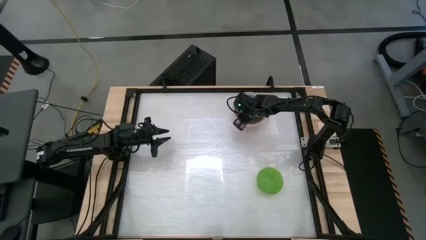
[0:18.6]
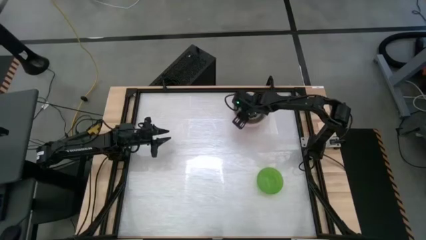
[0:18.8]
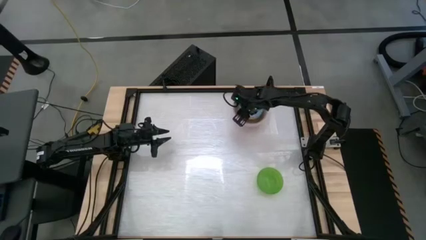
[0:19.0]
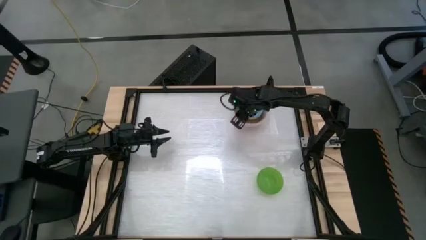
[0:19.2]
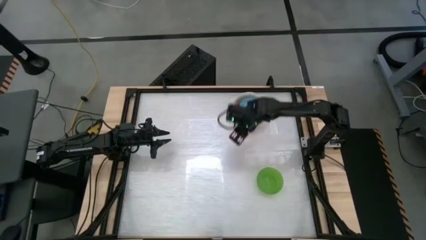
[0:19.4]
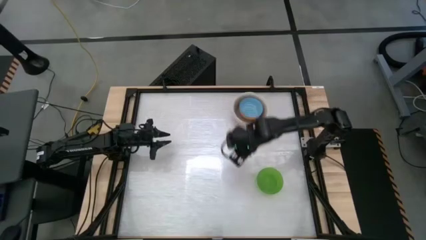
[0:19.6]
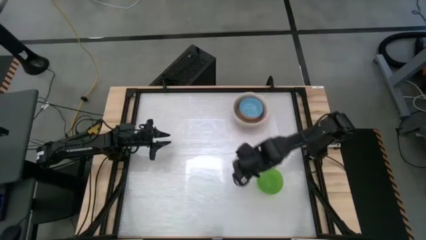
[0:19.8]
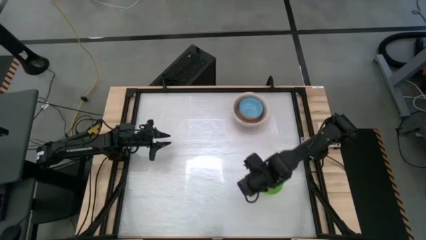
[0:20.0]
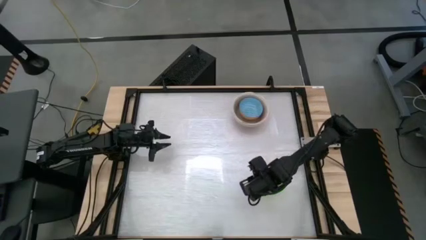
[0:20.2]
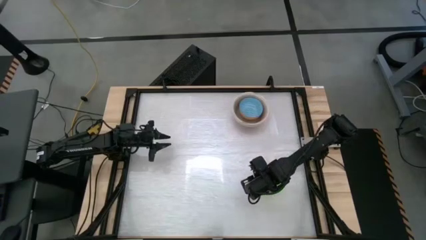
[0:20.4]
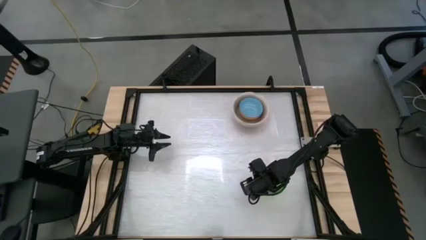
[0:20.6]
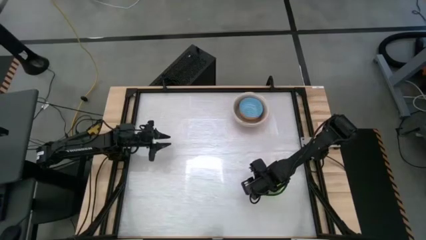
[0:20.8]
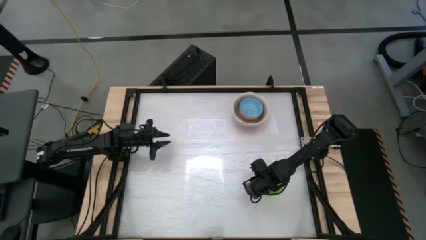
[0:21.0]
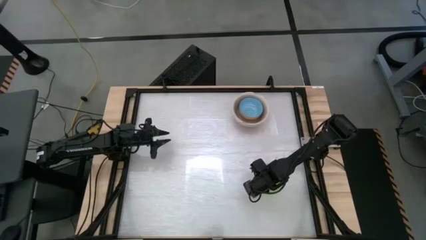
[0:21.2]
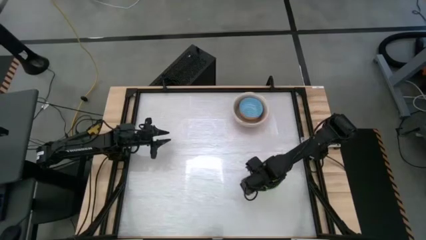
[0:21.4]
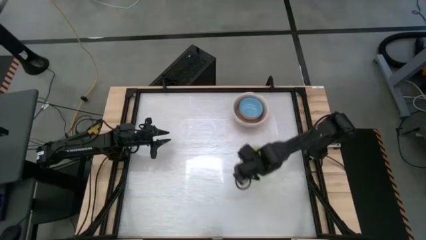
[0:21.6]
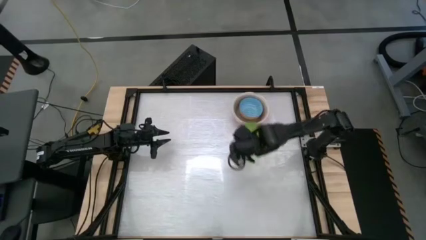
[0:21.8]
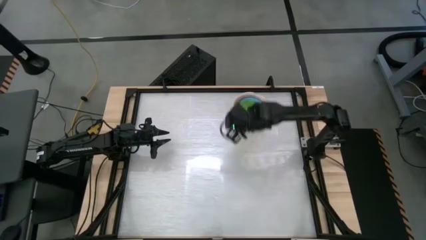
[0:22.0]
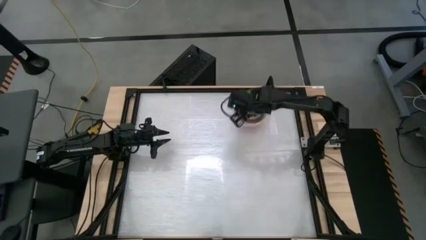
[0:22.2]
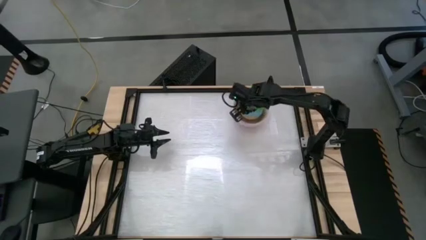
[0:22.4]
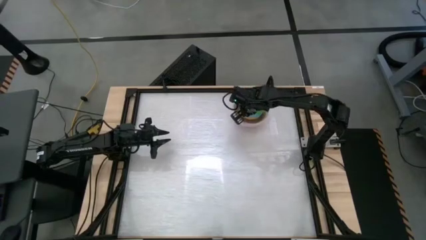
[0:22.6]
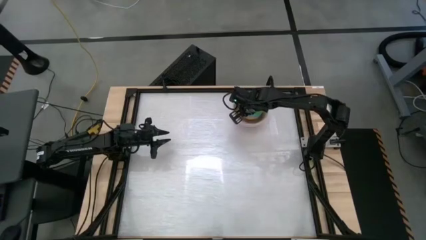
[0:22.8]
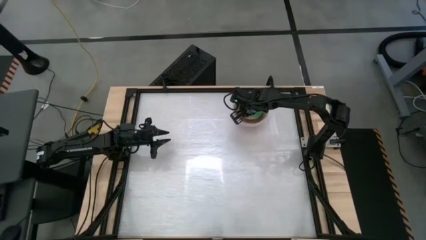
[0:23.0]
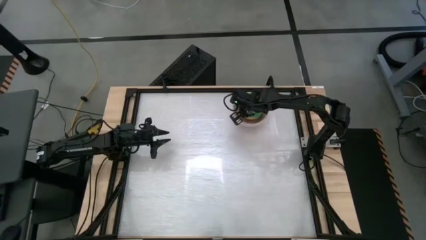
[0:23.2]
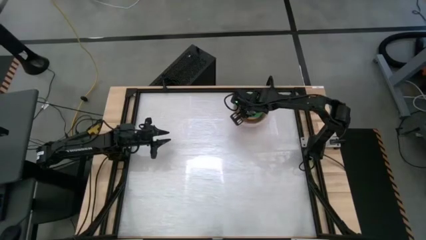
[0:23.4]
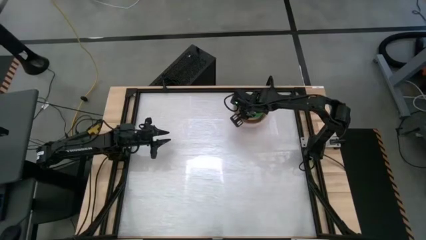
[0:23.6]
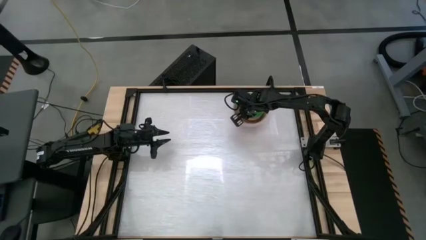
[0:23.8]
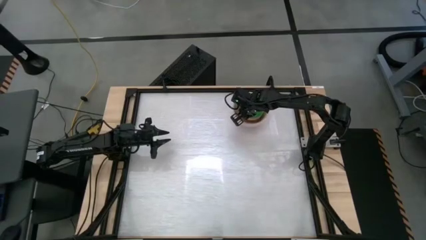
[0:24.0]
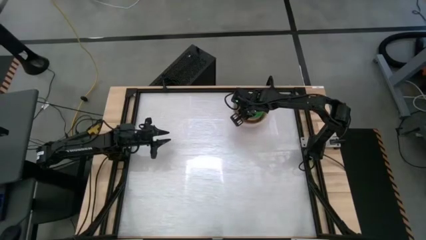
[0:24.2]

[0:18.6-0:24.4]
Stack the green bowl on the blue bowl

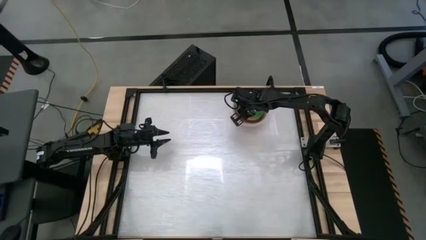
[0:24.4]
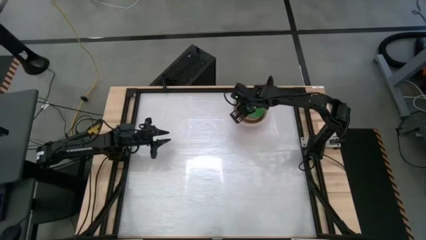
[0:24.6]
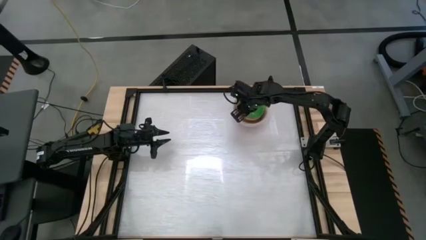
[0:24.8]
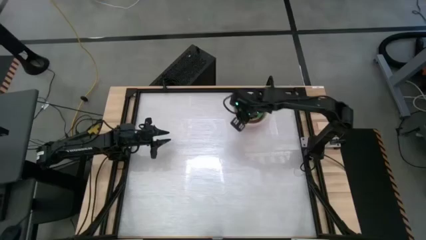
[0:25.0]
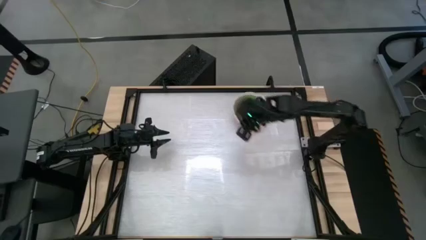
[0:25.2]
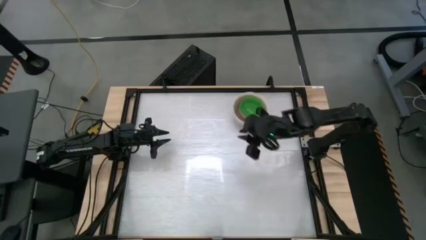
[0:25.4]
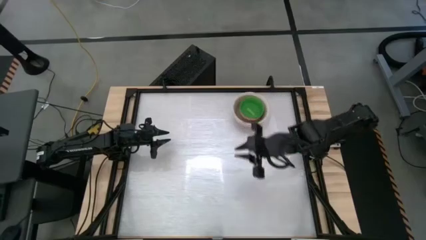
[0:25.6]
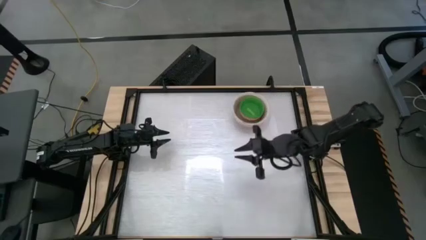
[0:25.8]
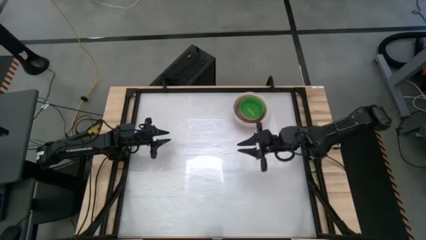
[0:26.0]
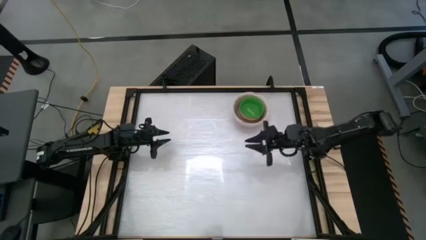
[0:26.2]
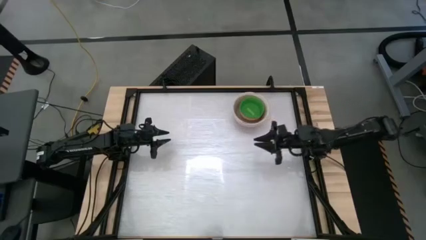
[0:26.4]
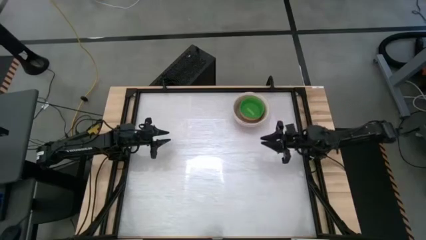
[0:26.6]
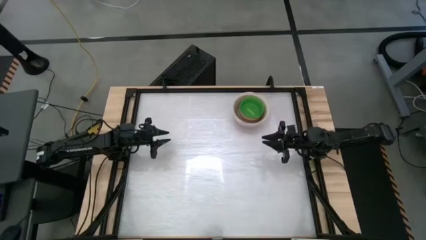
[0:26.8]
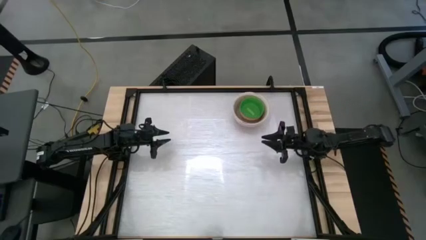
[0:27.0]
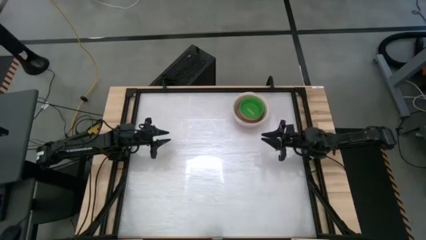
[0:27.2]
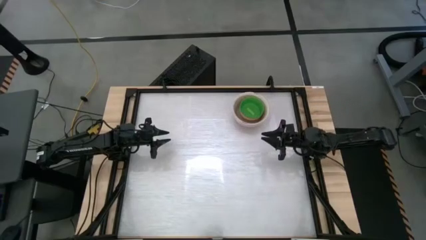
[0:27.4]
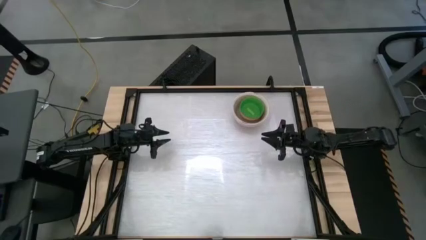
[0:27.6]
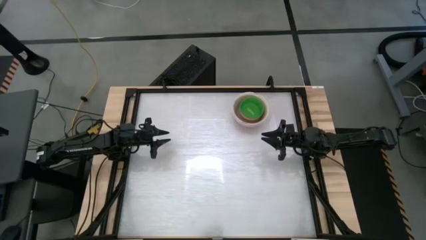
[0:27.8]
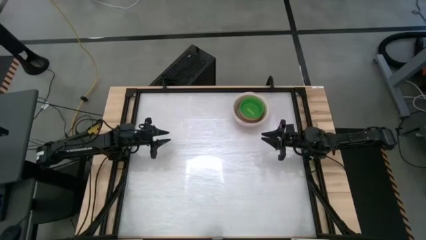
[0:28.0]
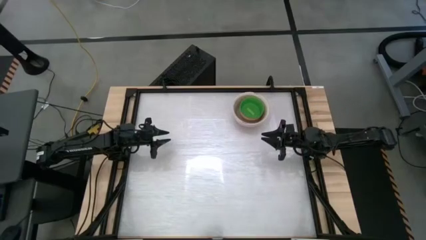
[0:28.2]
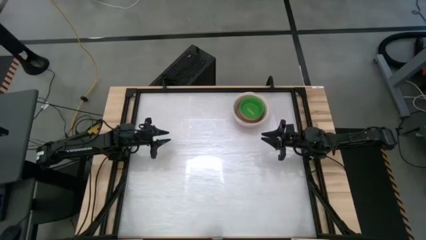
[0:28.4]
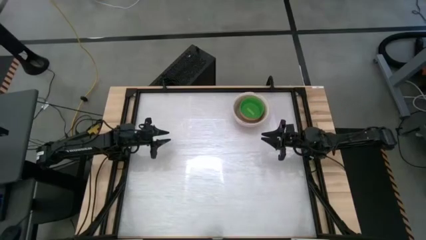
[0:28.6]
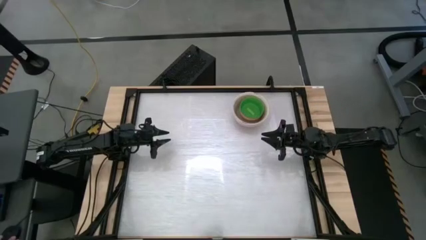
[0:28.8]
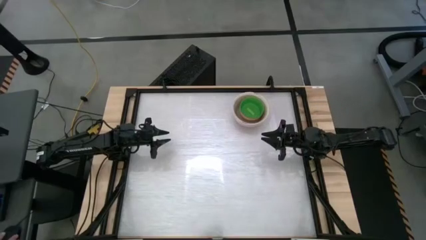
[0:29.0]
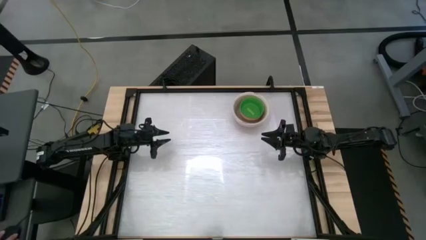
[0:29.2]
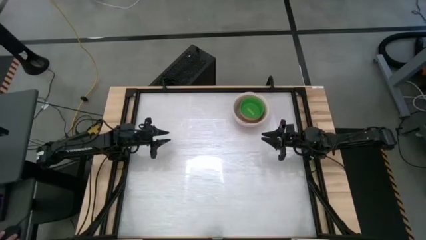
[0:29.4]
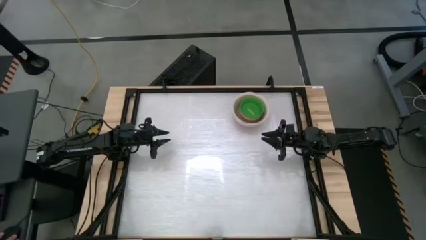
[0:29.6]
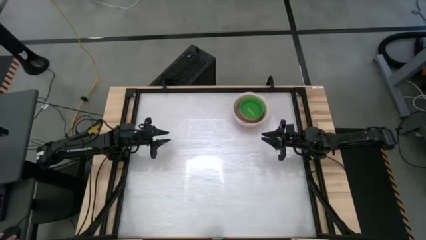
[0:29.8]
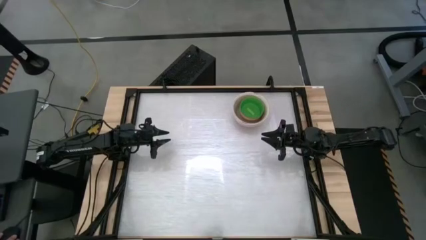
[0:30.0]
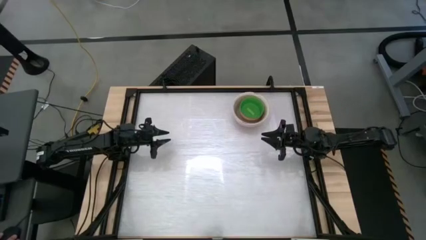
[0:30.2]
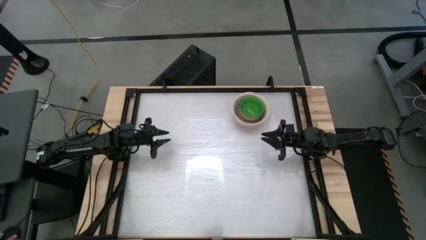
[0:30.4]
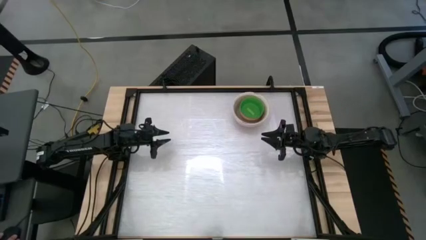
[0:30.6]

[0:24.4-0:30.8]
Return to Home Position
